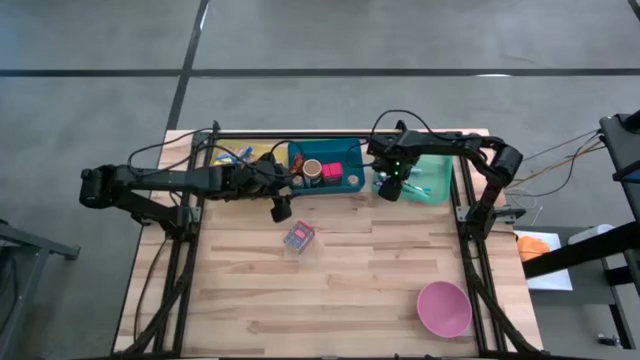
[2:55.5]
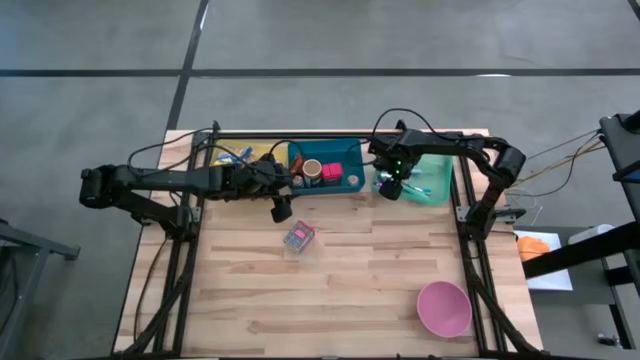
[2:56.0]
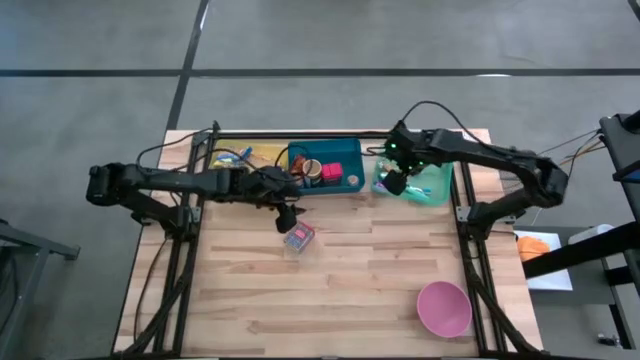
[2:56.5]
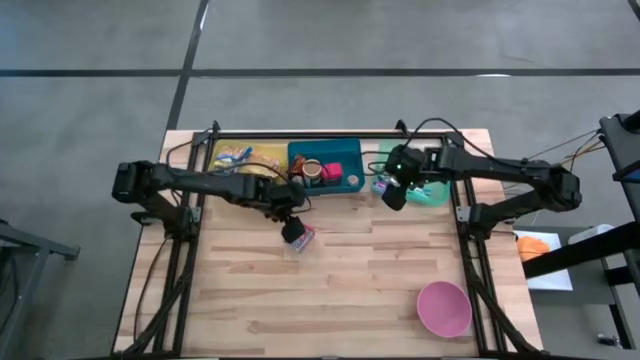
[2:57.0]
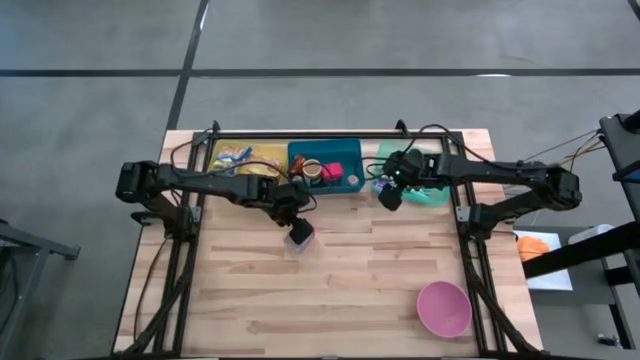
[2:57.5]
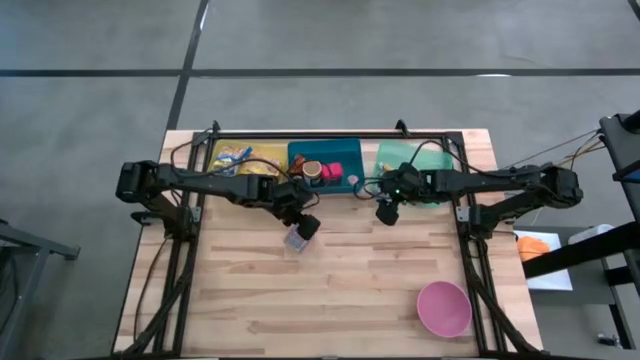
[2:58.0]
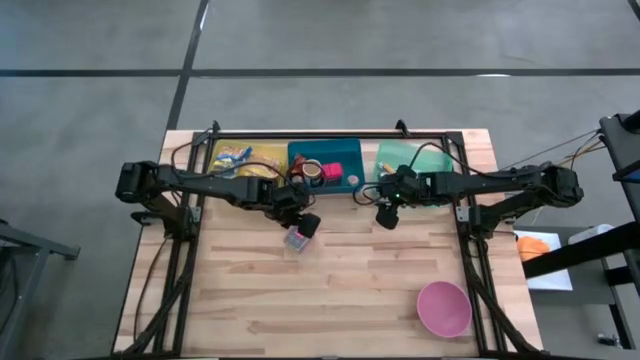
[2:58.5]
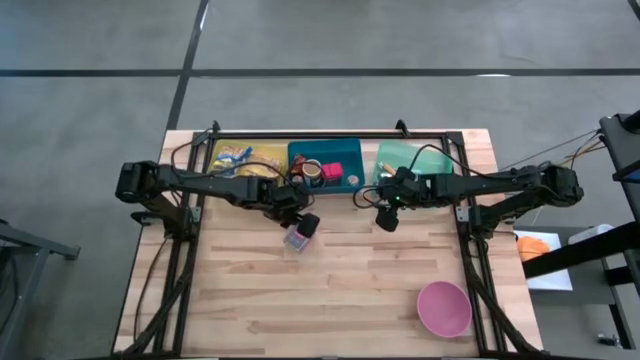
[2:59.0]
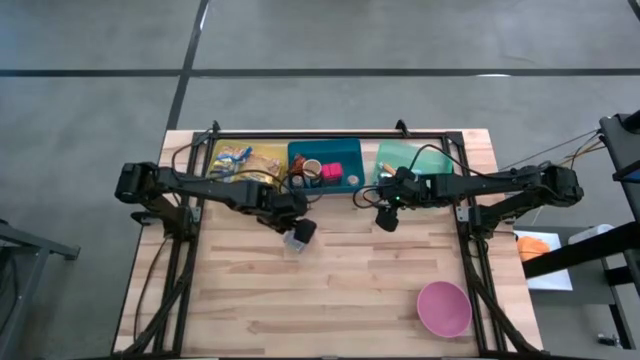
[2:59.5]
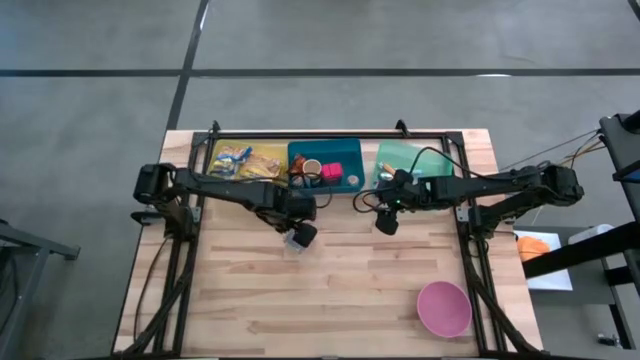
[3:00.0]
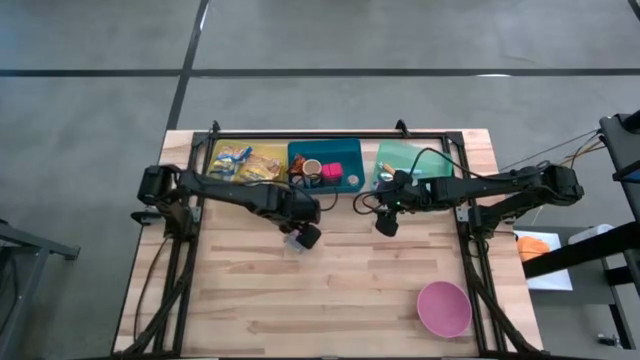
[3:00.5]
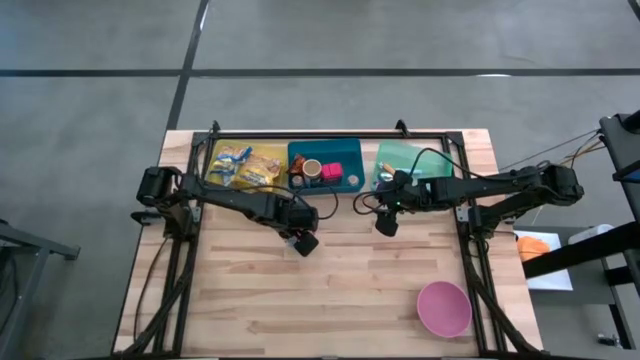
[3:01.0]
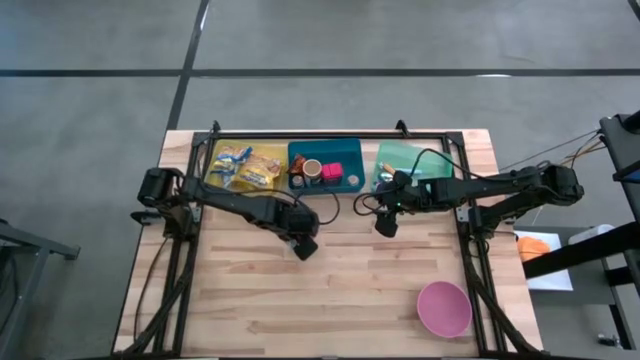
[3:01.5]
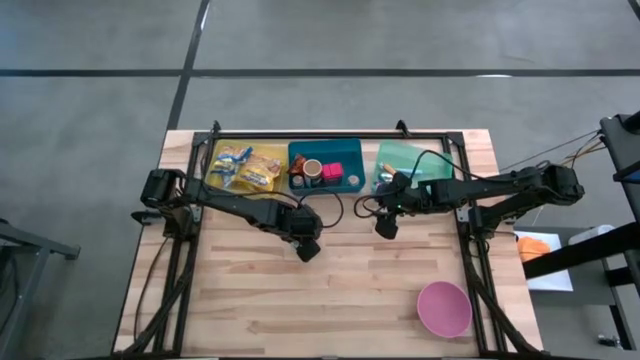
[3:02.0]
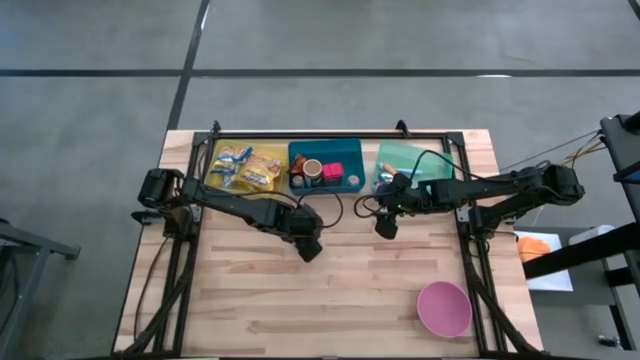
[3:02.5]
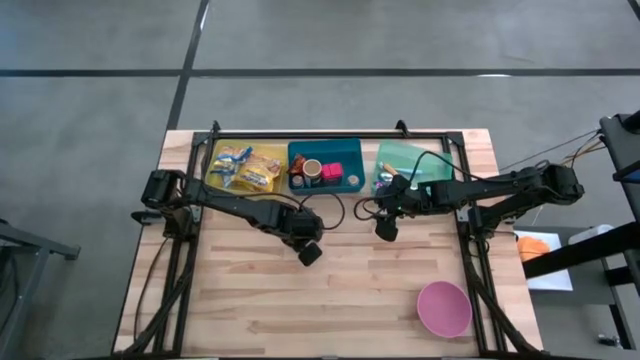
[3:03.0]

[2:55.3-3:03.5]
Put the red seasoning into the blue bin

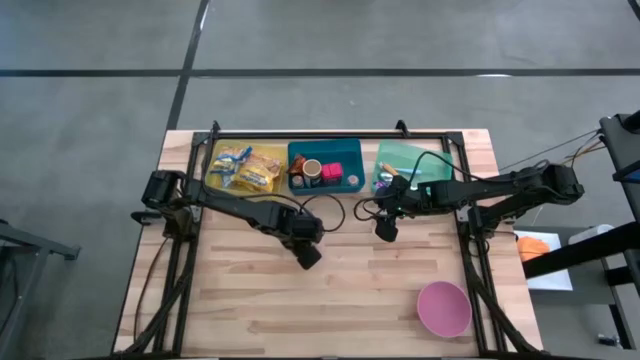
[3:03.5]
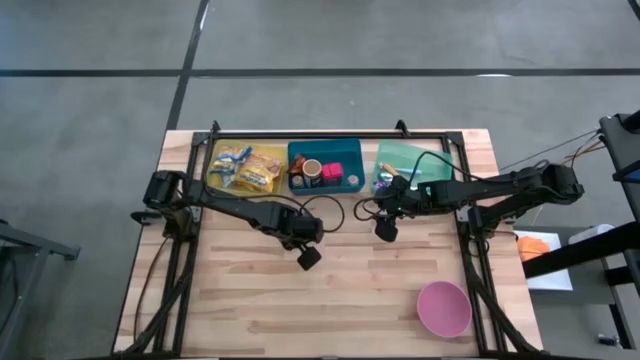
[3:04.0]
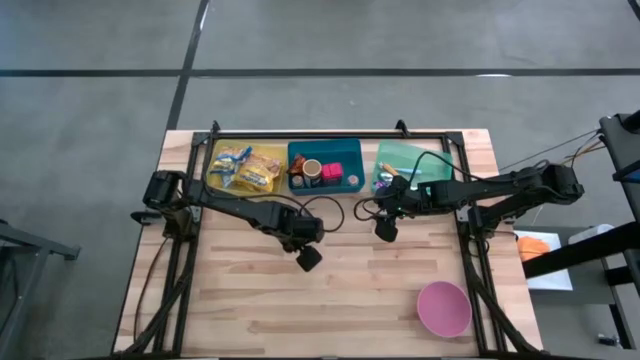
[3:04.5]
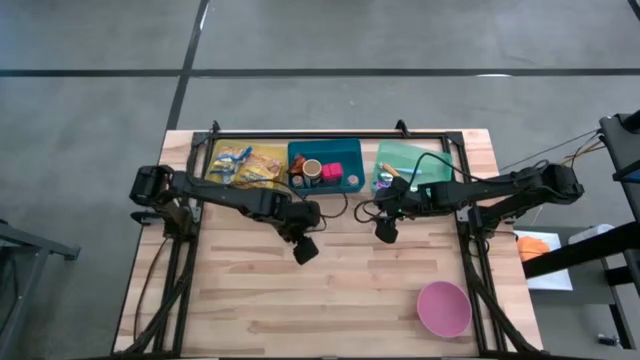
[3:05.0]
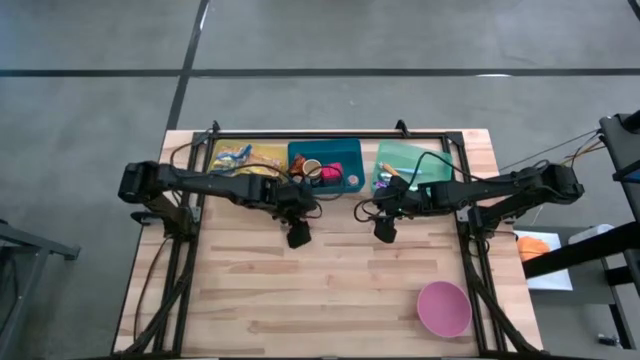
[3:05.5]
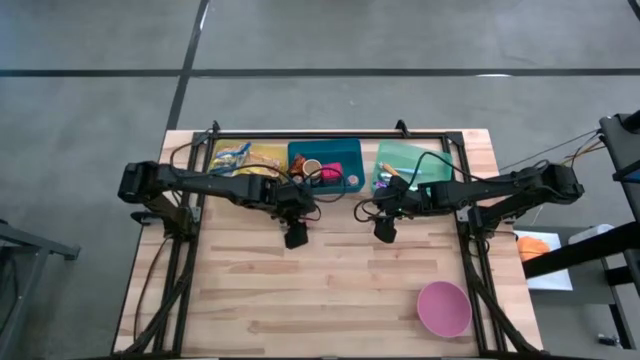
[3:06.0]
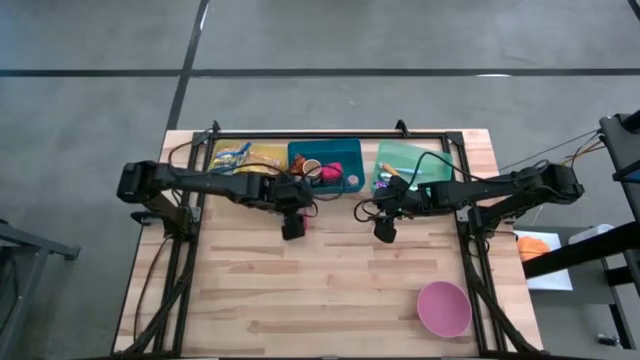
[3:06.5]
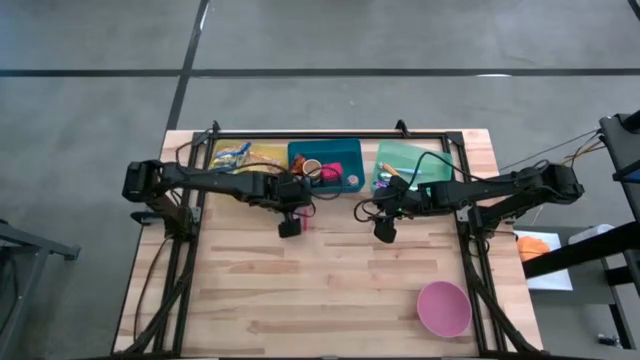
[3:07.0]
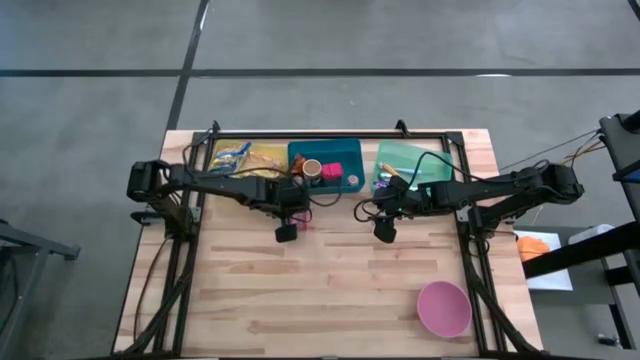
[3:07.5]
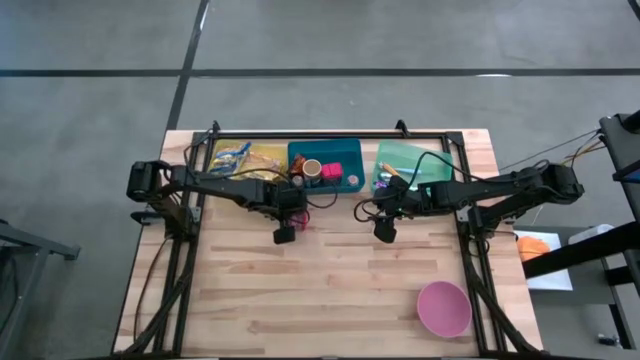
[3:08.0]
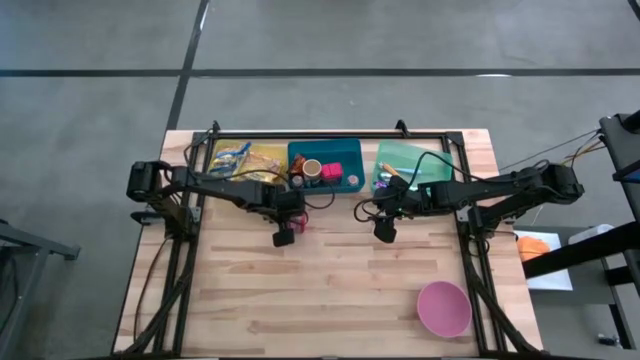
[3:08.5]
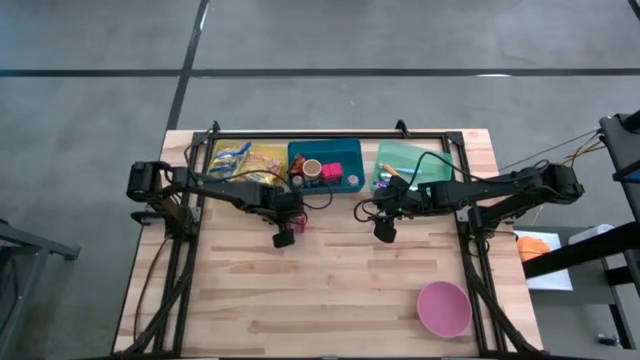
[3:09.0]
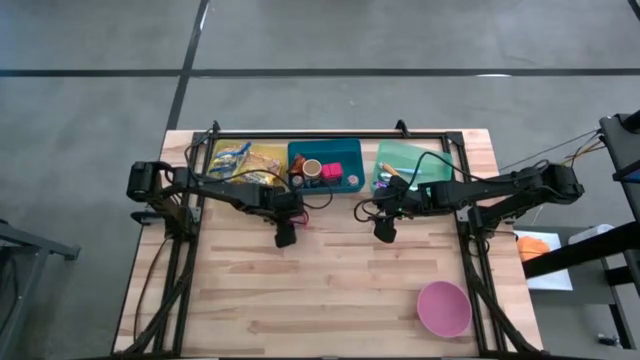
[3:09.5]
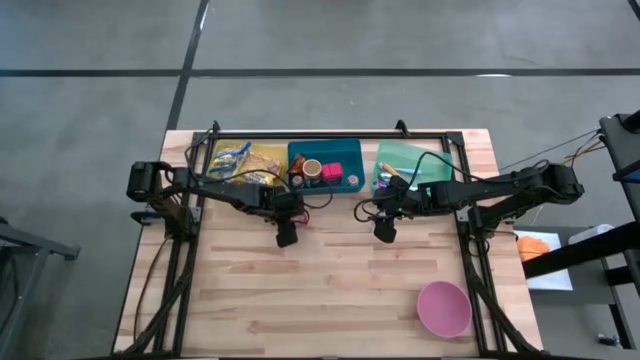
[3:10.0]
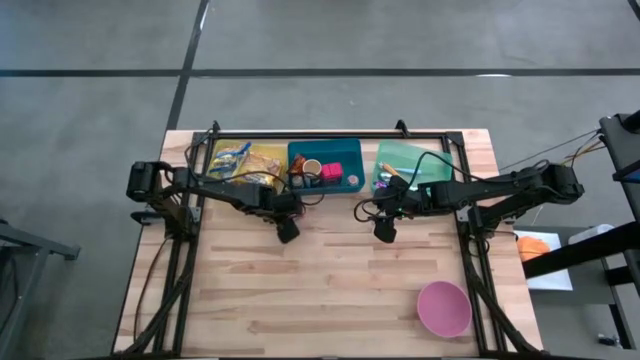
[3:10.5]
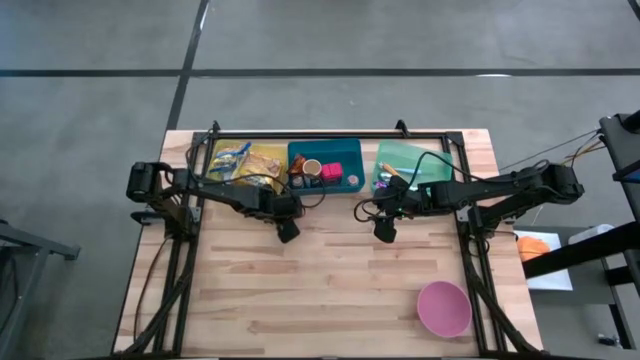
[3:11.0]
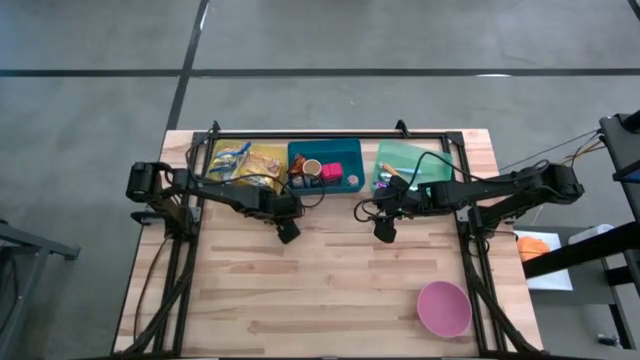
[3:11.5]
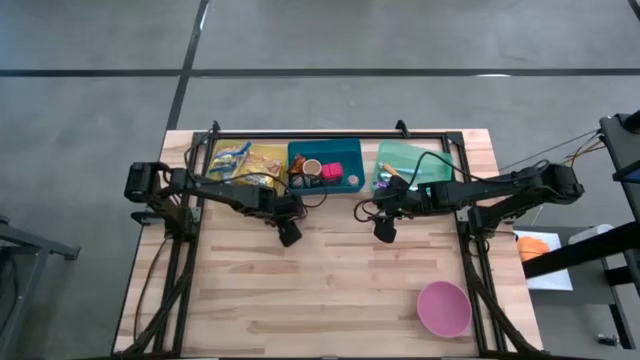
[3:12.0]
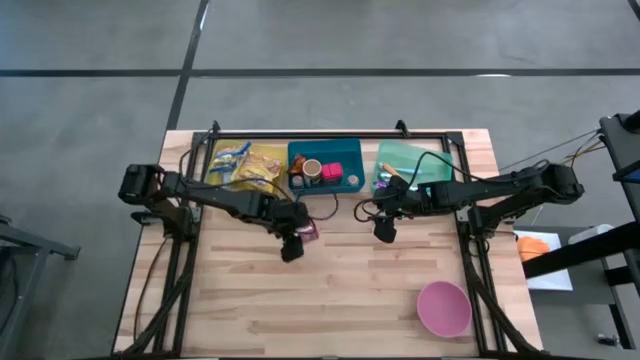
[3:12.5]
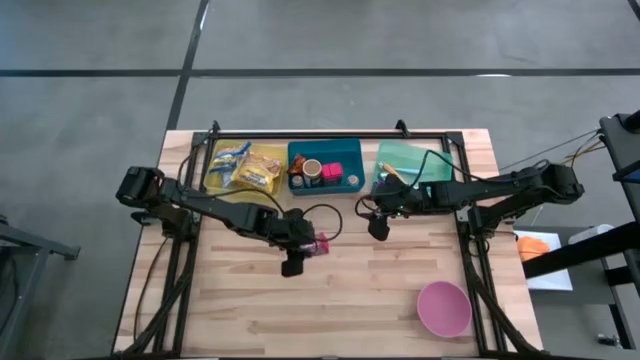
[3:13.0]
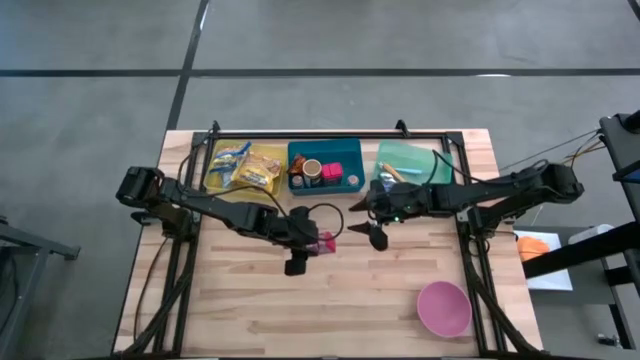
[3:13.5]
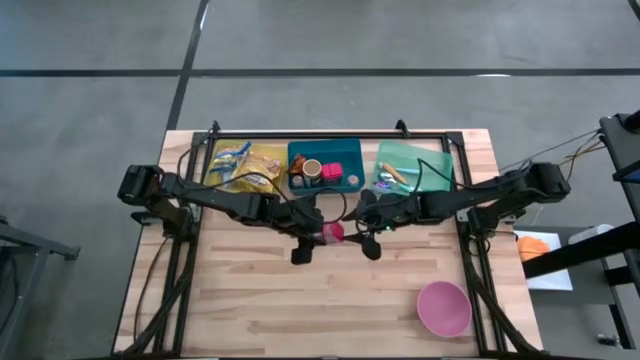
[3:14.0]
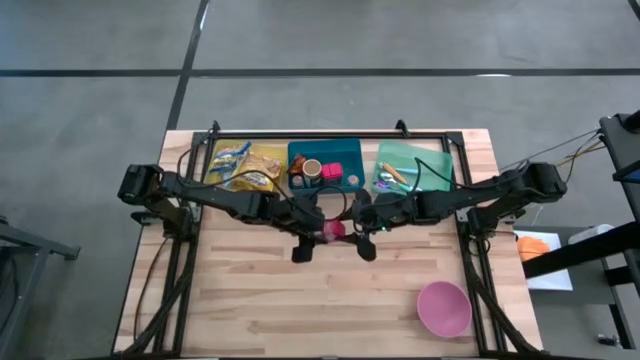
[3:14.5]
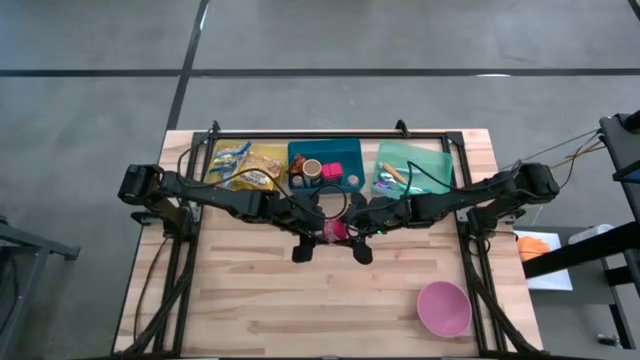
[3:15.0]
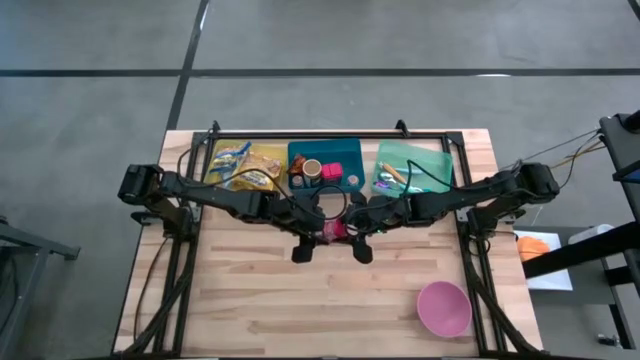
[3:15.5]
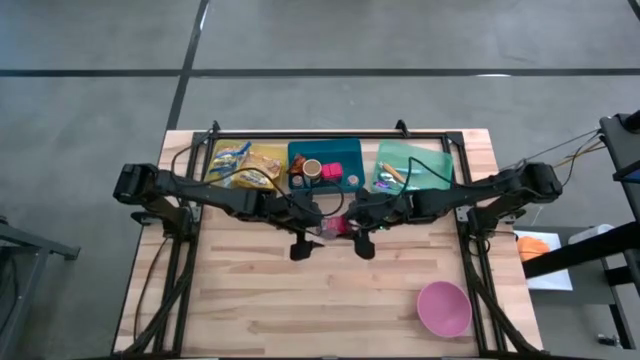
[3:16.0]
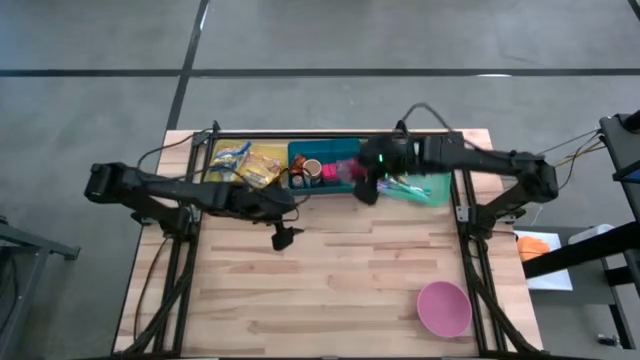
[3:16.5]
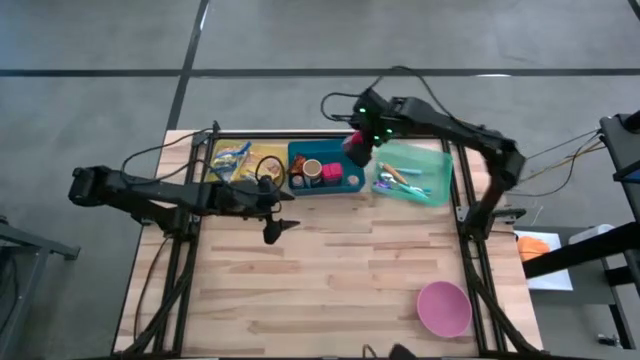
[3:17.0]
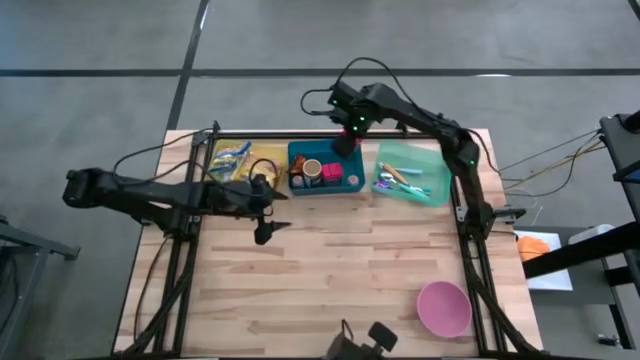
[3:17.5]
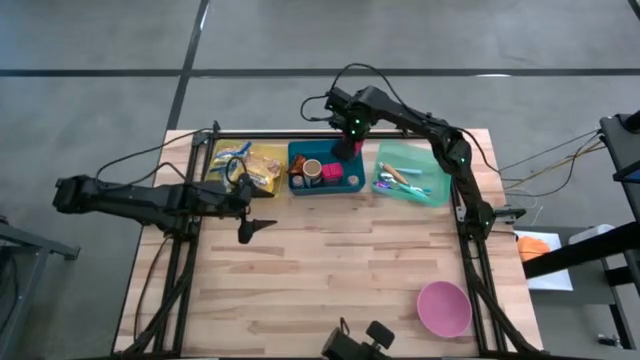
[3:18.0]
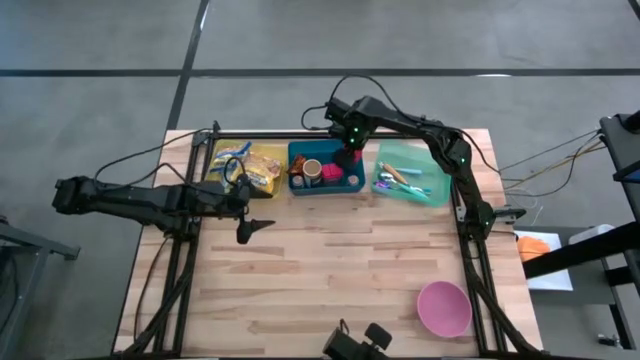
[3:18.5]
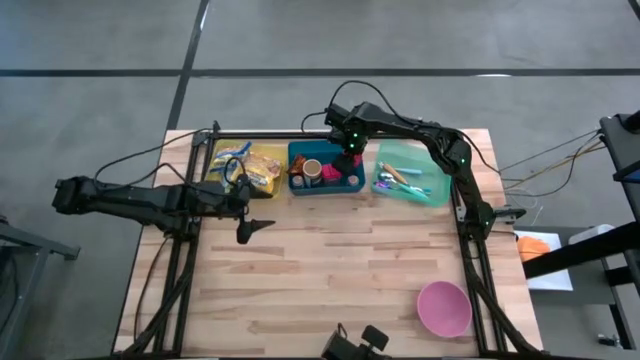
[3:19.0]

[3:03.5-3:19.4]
Put the red seasoning can into the blue bin
